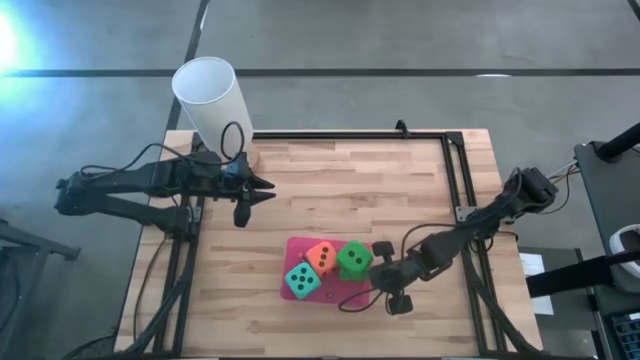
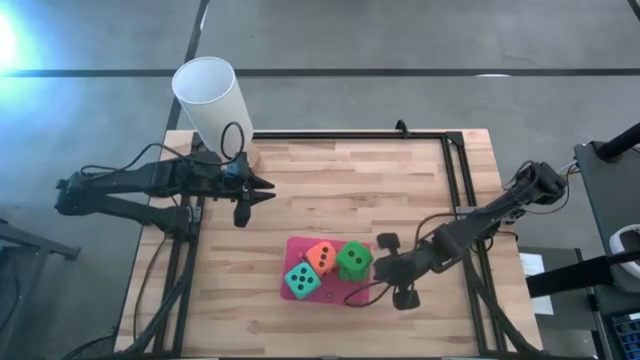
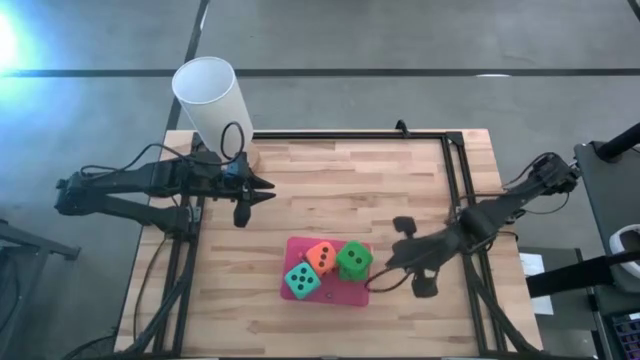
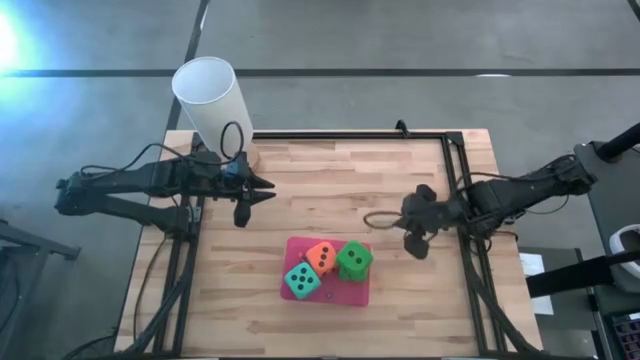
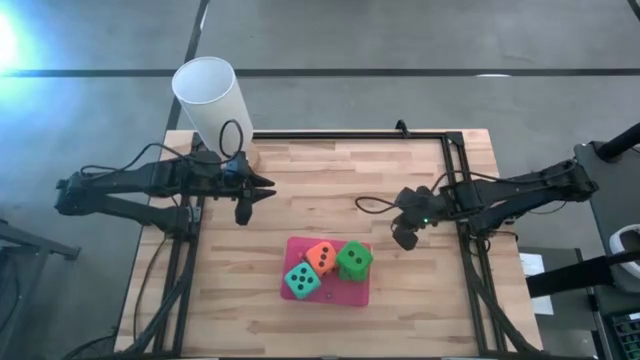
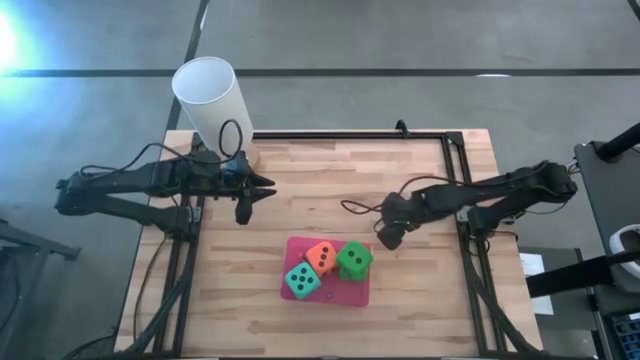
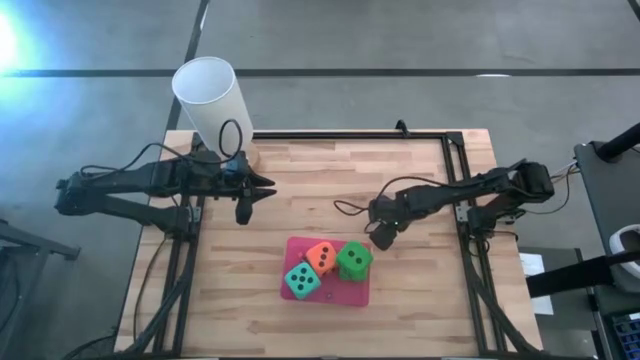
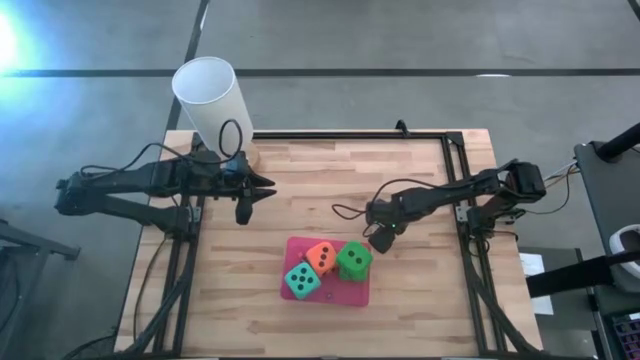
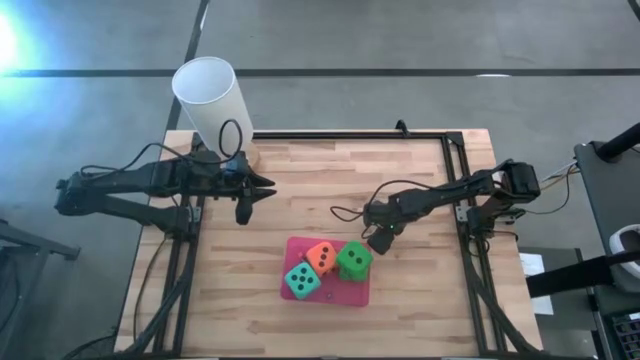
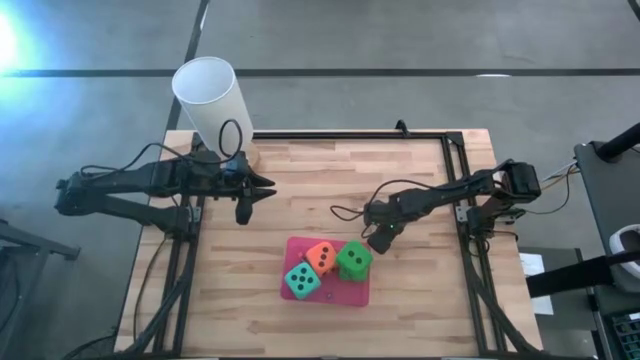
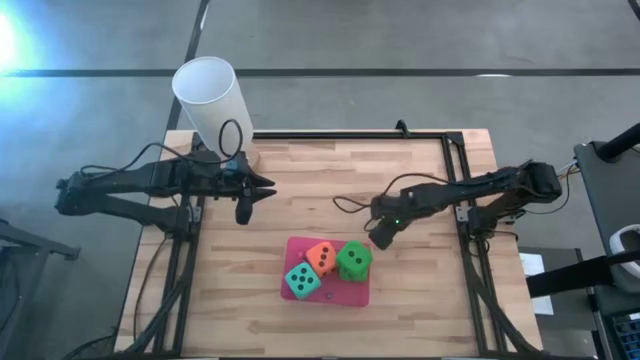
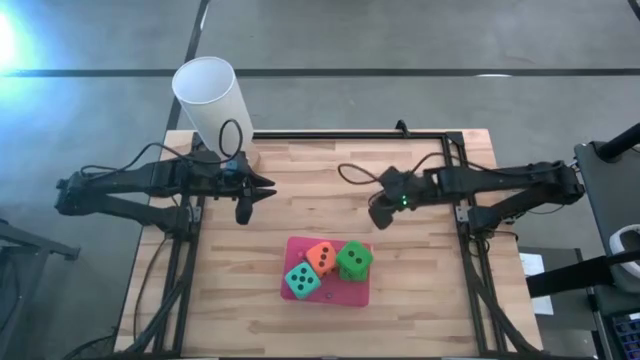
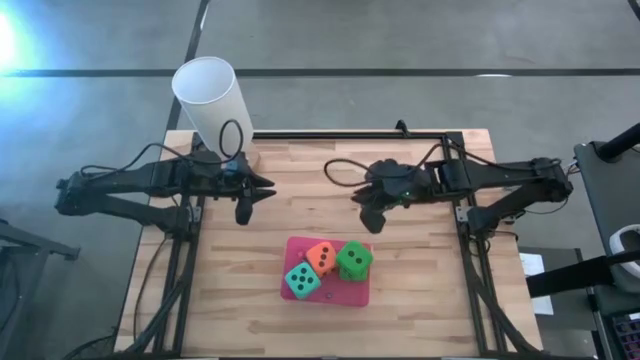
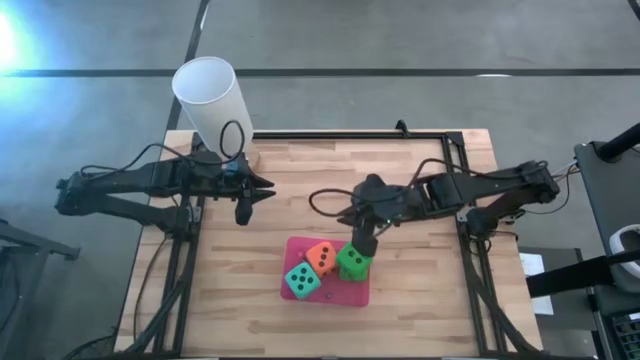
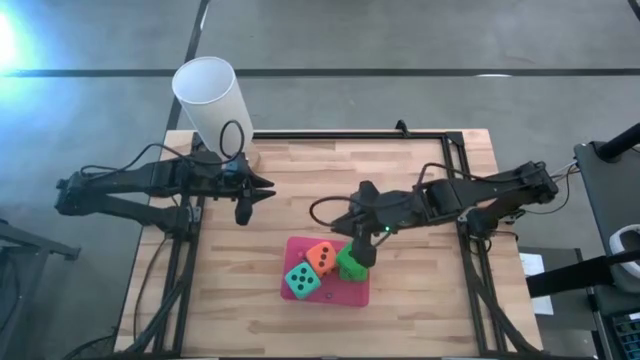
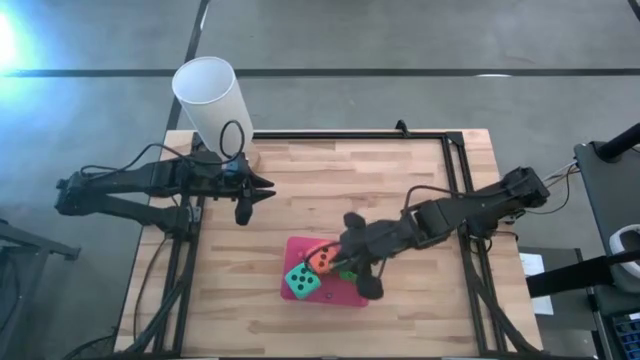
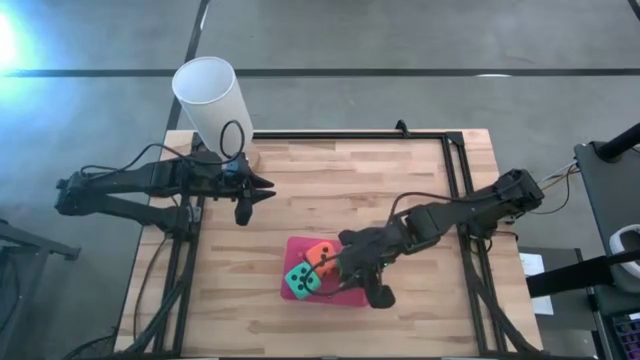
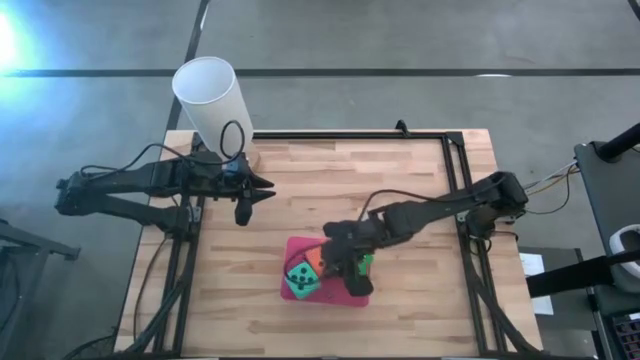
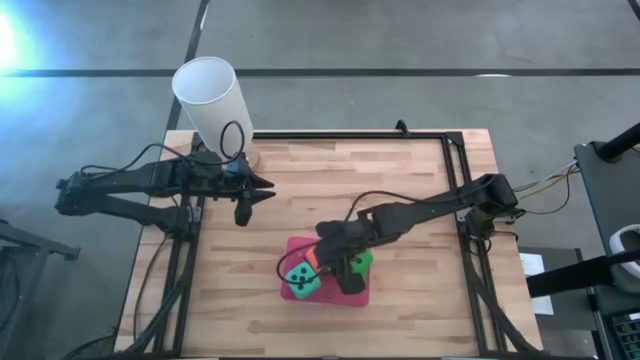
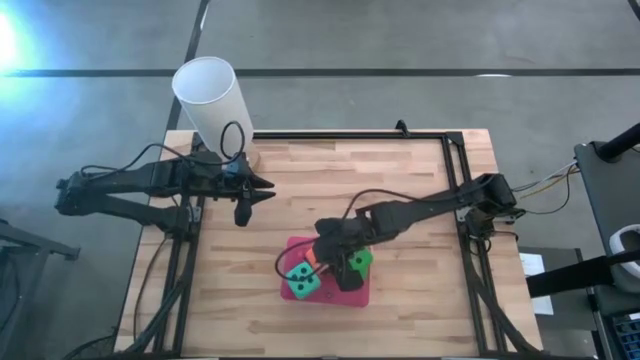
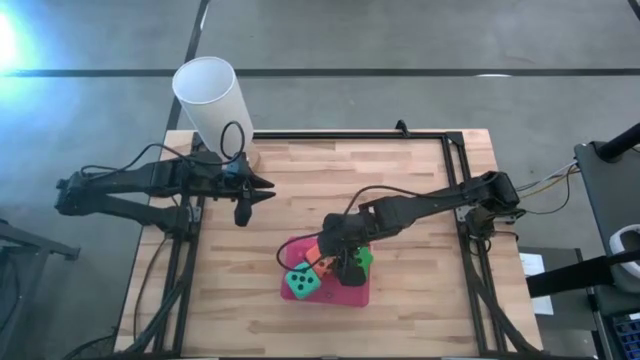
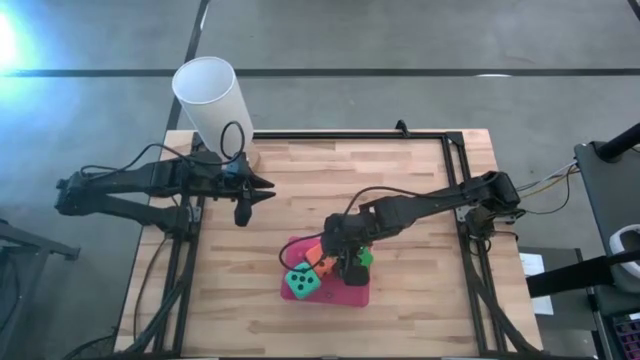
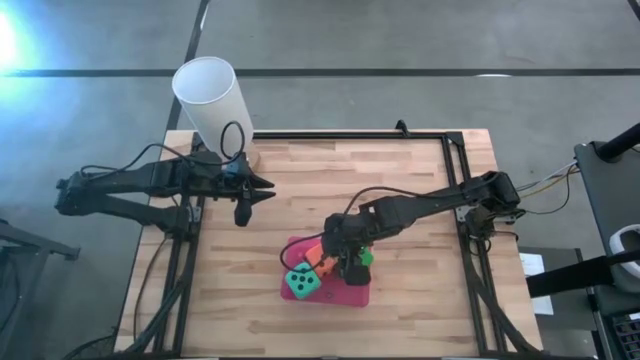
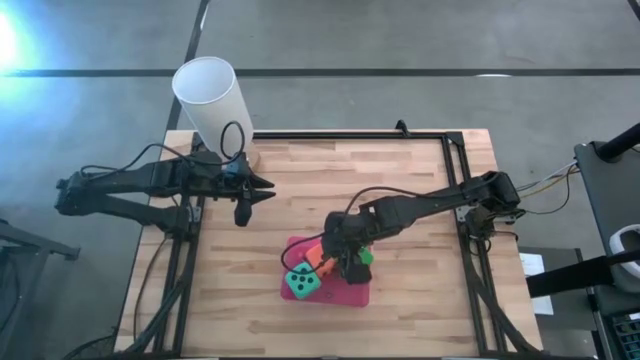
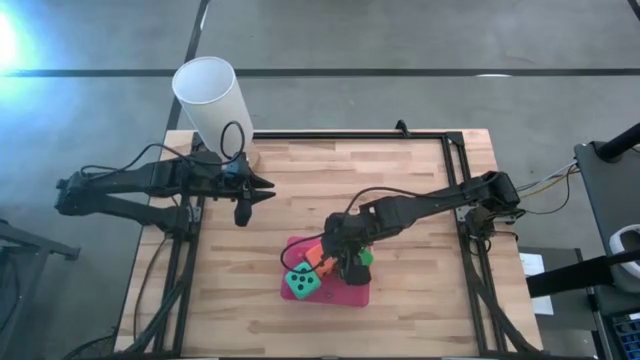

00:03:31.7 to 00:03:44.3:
Task: Pick & Place Dice
Put the small yellow dice into the pink bin

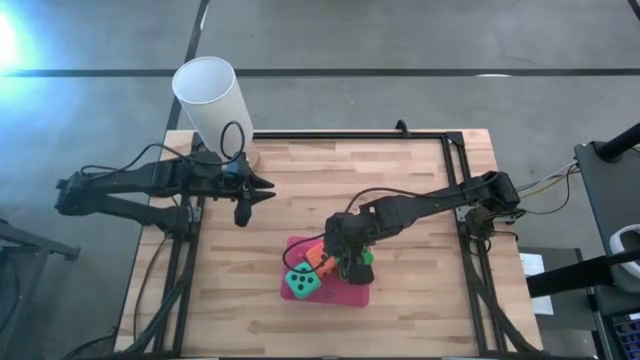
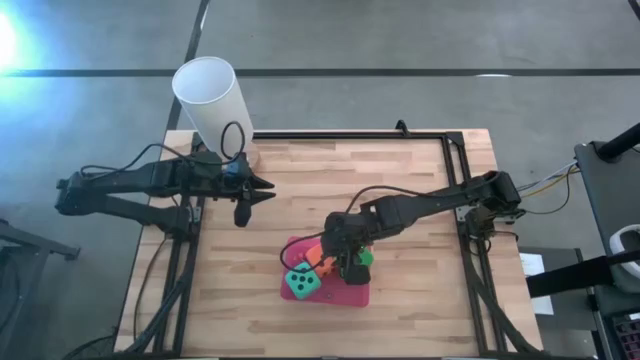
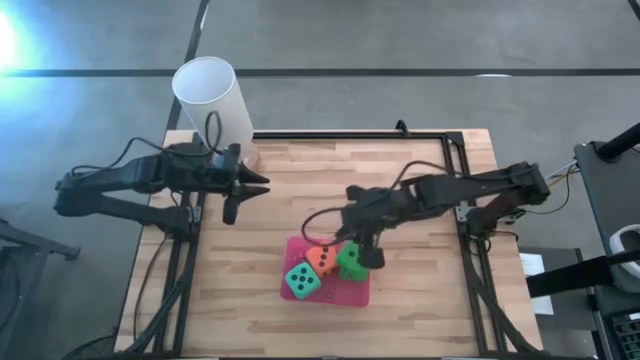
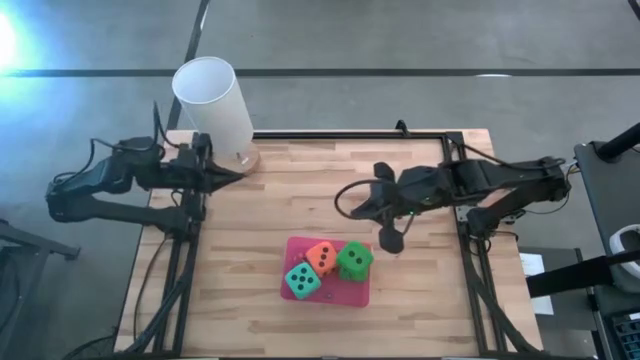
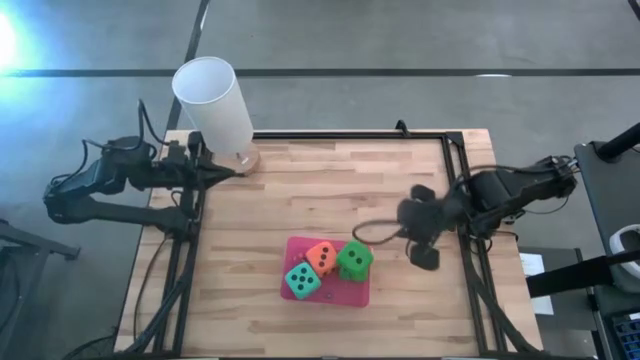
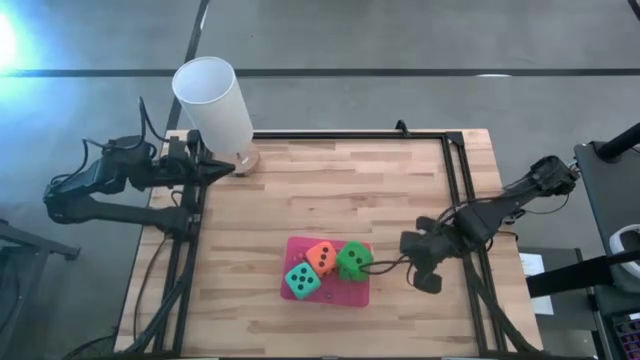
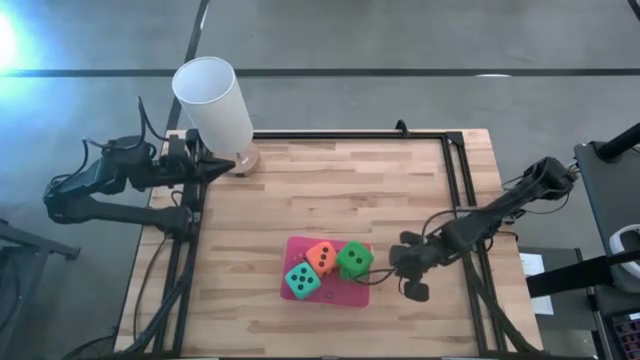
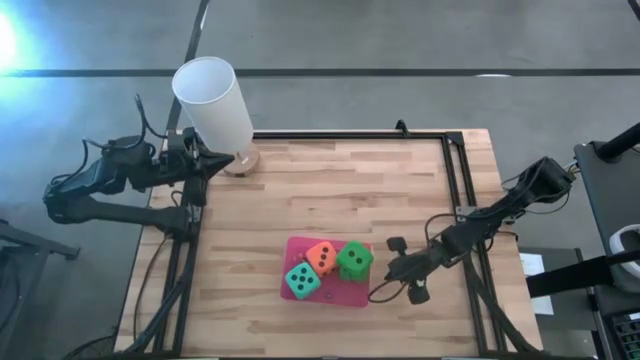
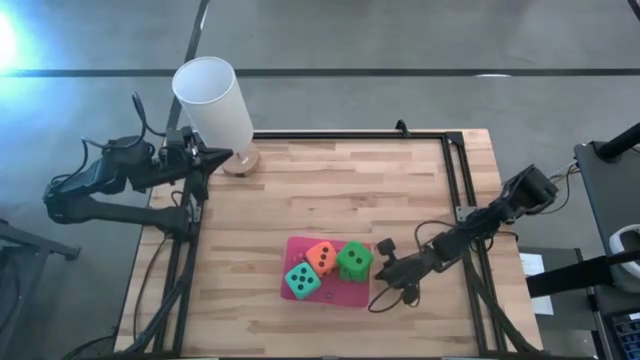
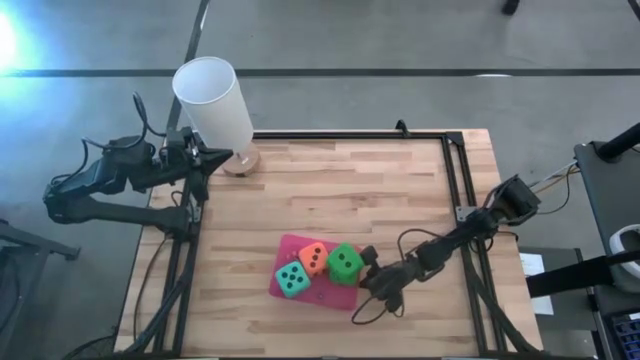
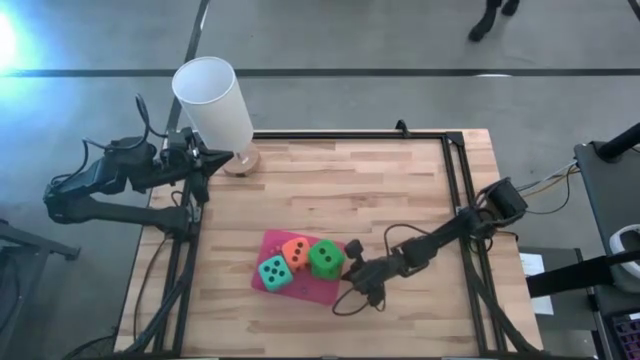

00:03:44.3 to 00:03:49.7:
Adjust the pink bin

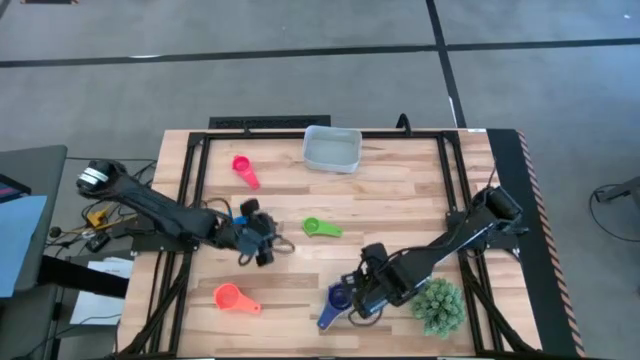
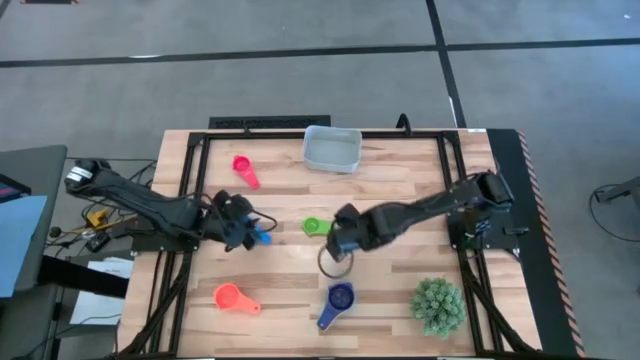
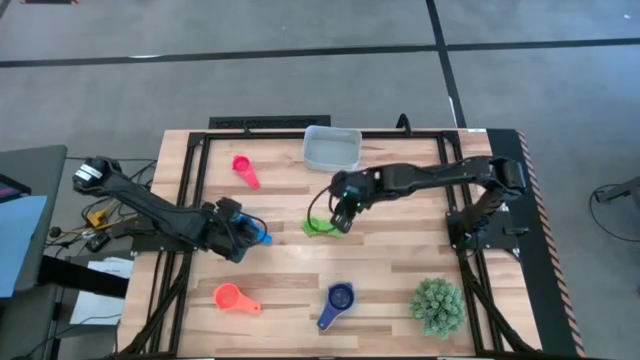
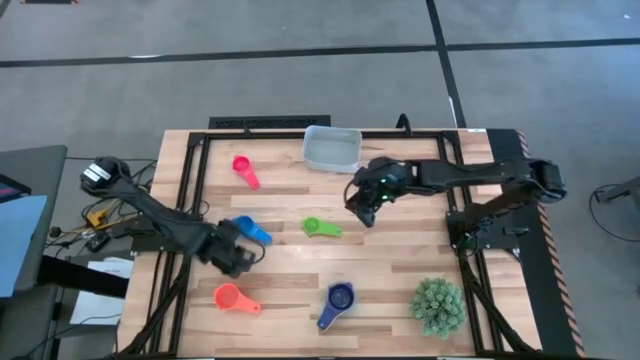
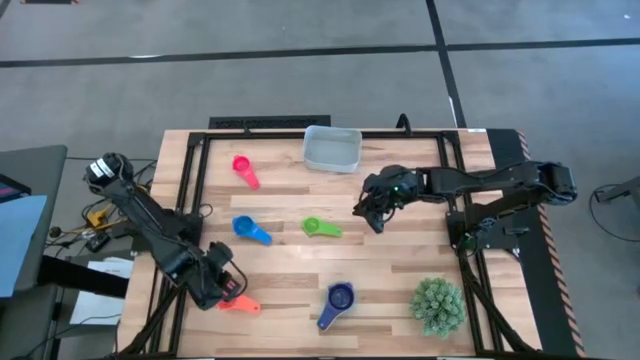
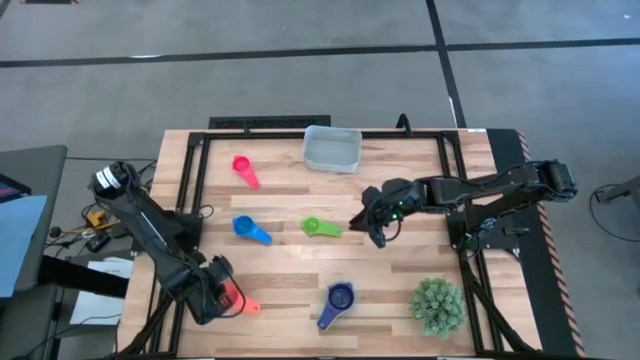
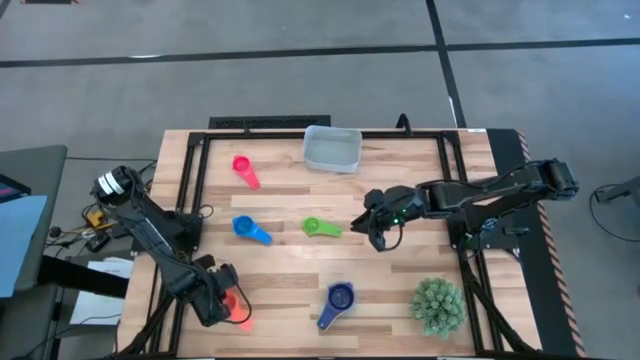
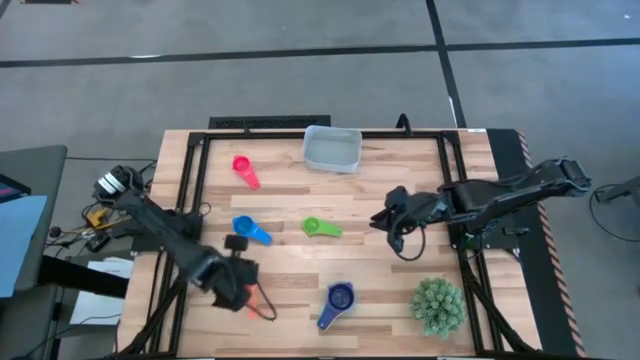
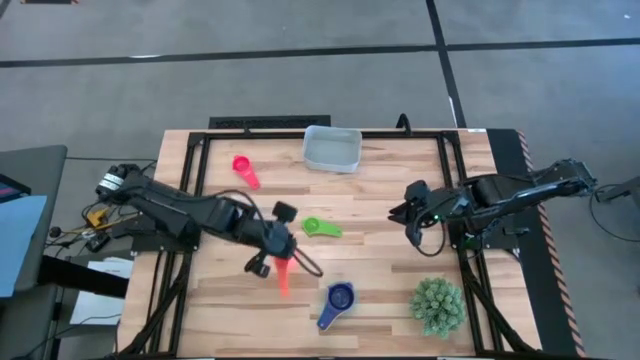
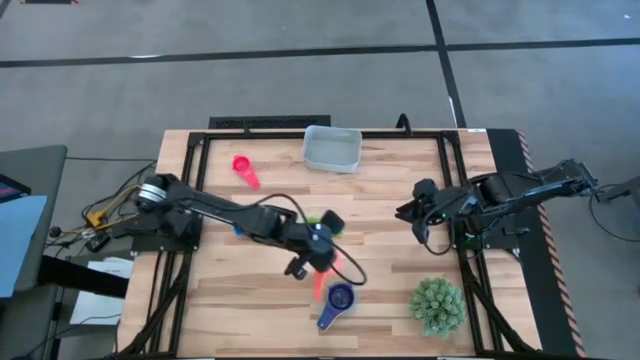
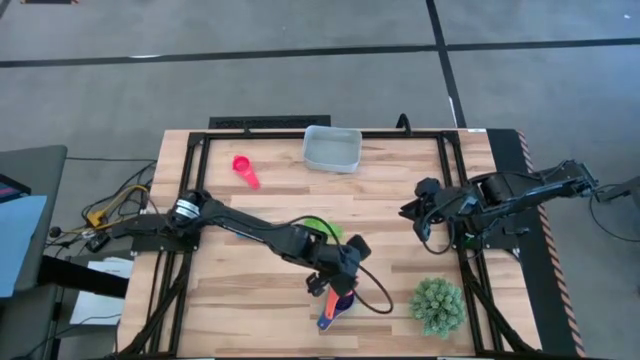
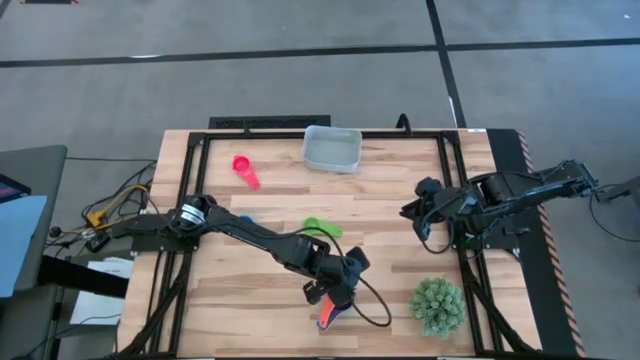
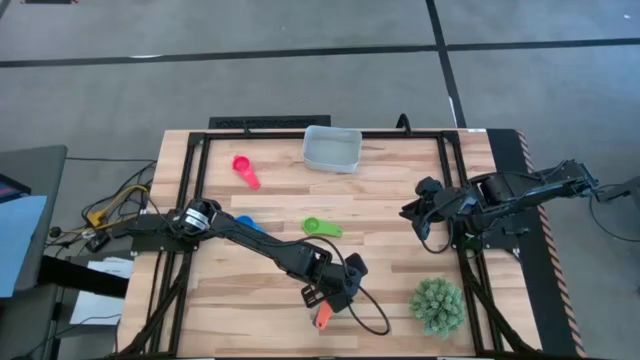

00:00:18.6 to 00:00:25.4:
Task: Nest measuring cups in basket
Stack the orange measuring cup on top of the dark blue measuring cup
